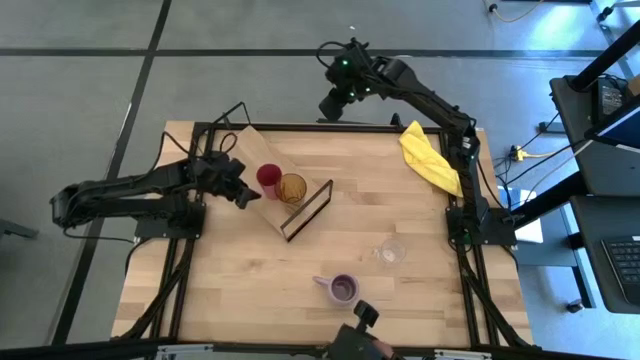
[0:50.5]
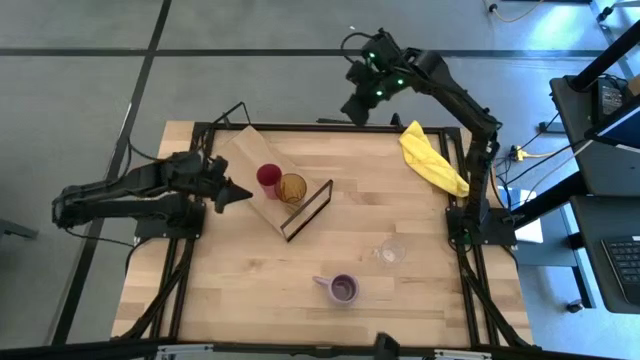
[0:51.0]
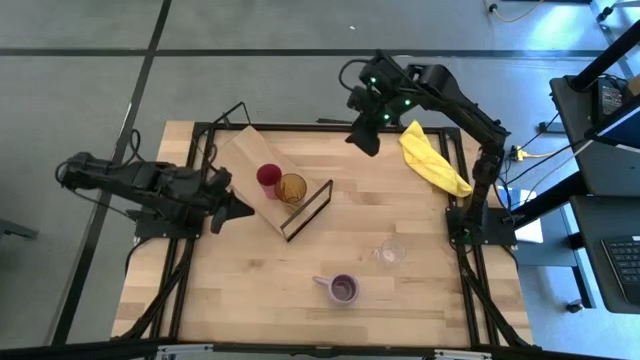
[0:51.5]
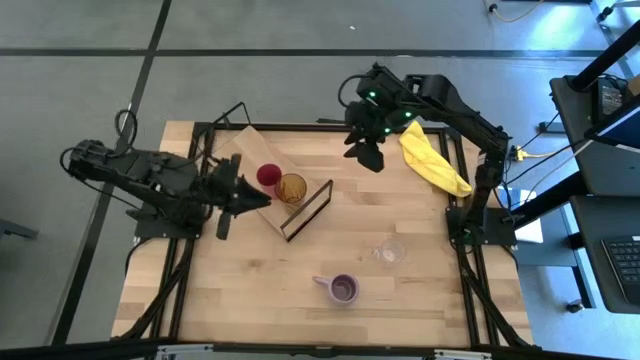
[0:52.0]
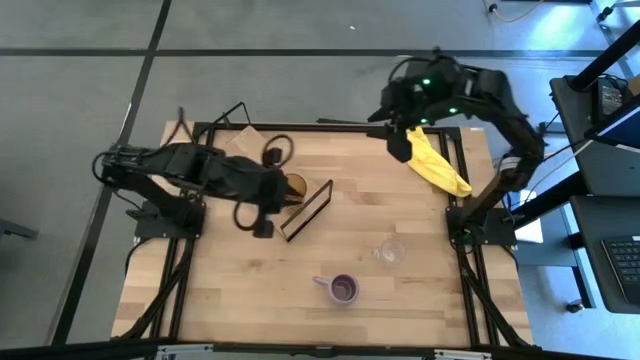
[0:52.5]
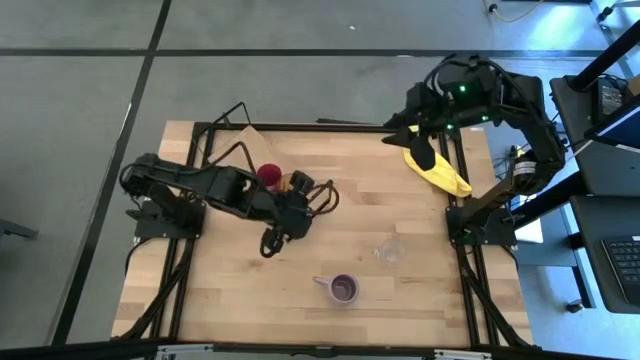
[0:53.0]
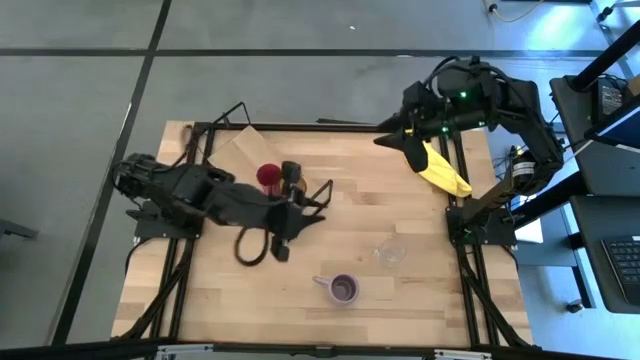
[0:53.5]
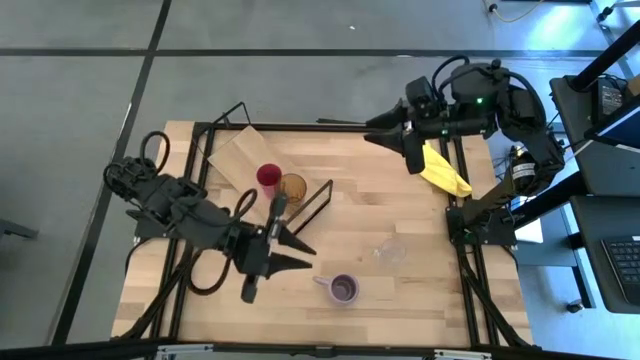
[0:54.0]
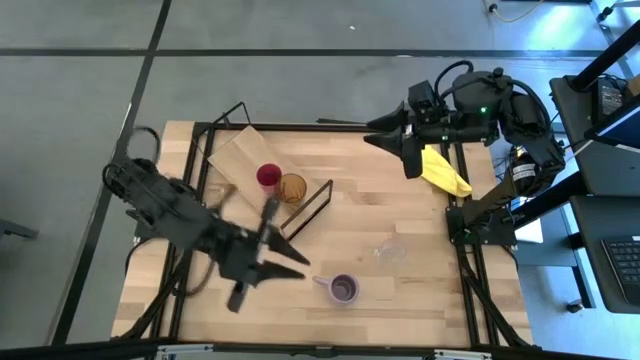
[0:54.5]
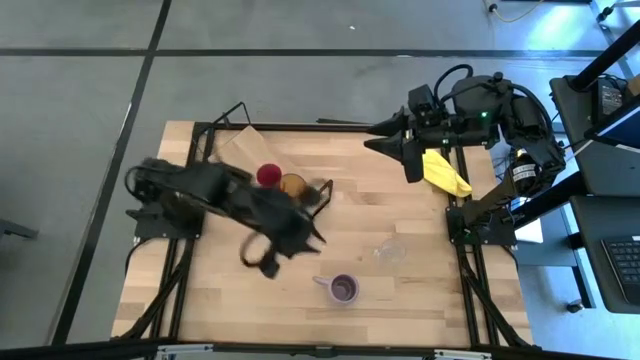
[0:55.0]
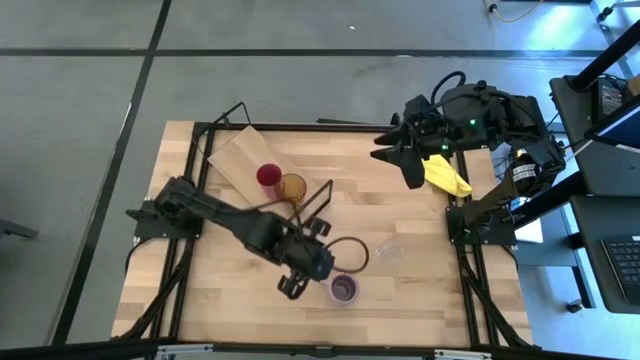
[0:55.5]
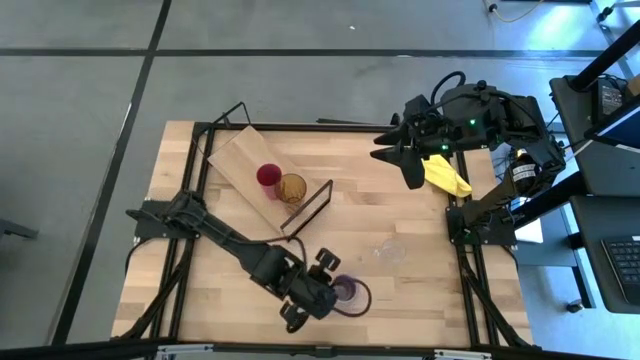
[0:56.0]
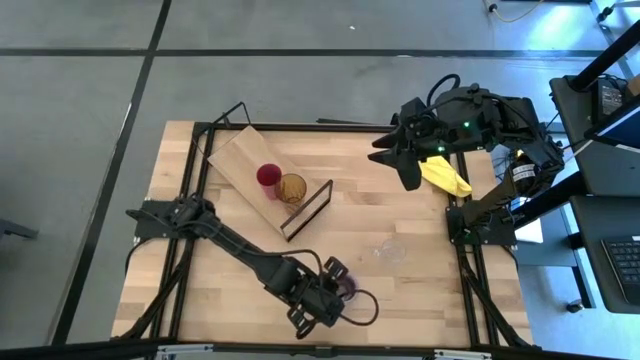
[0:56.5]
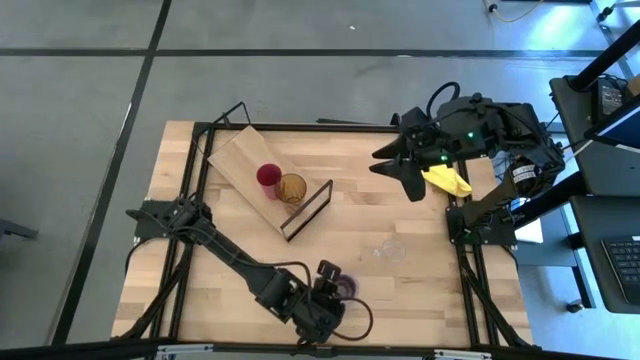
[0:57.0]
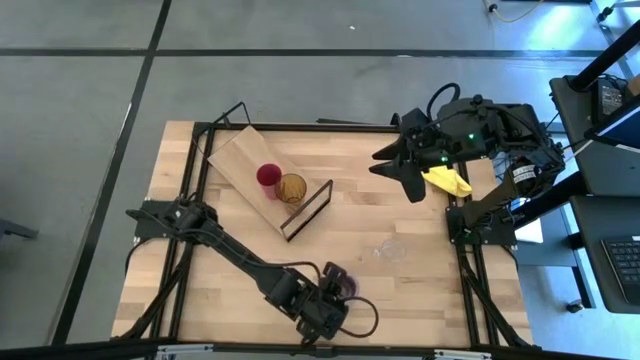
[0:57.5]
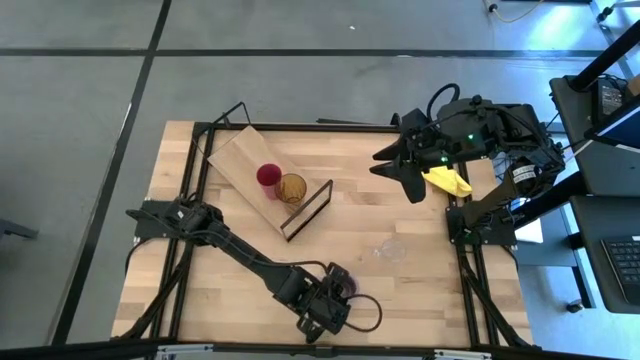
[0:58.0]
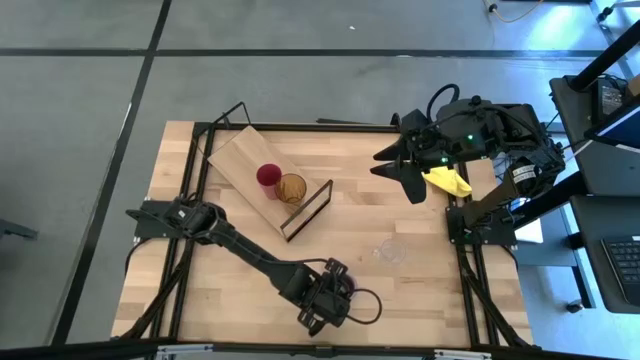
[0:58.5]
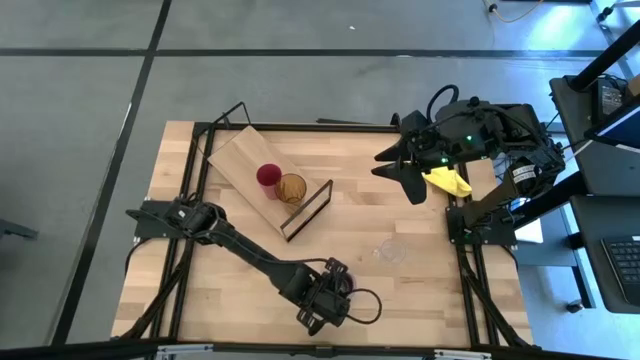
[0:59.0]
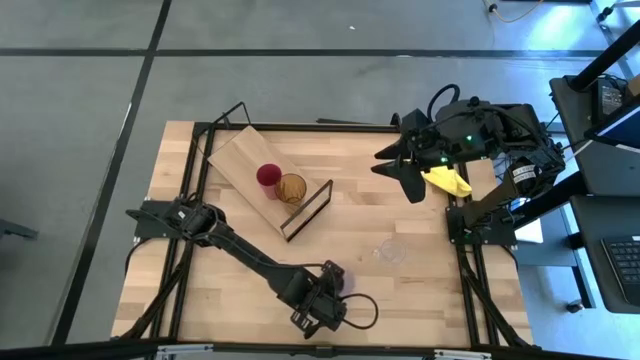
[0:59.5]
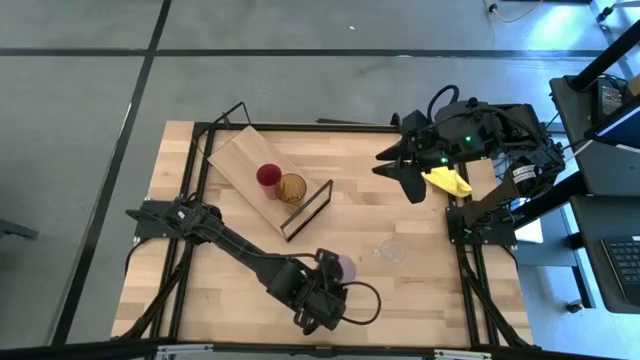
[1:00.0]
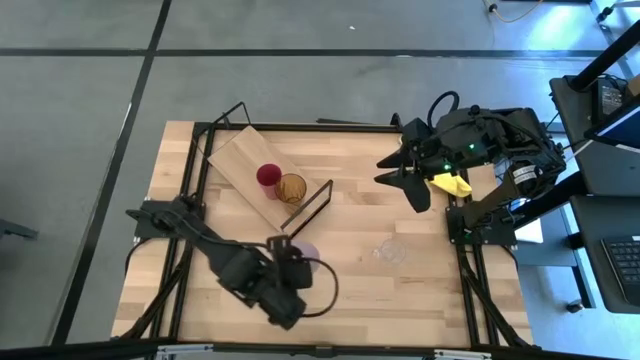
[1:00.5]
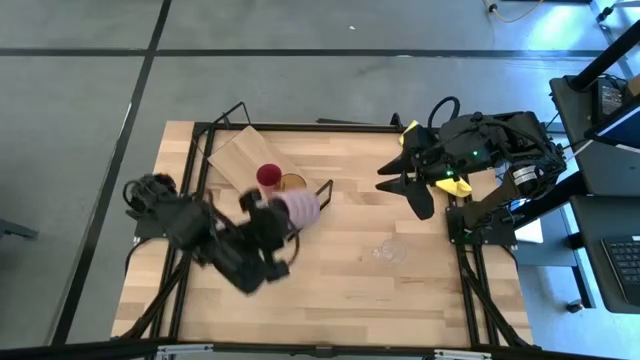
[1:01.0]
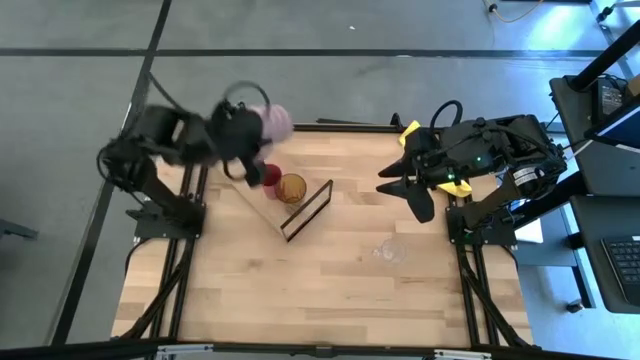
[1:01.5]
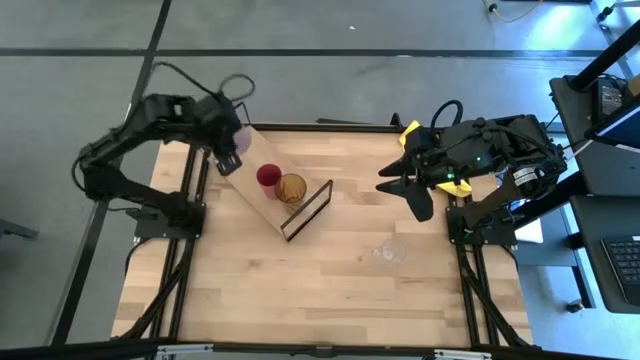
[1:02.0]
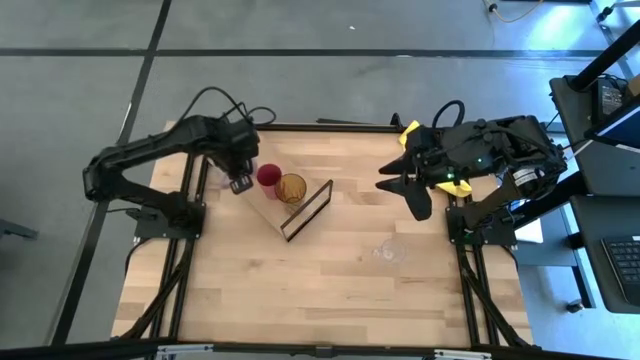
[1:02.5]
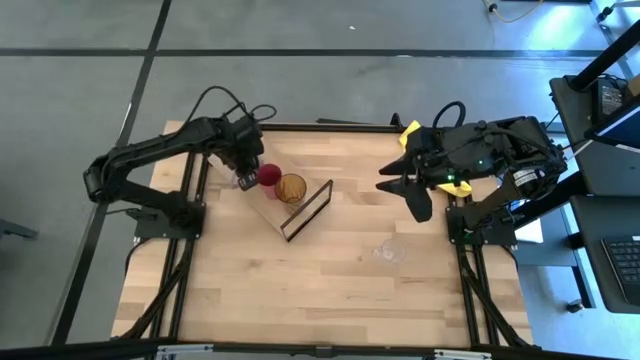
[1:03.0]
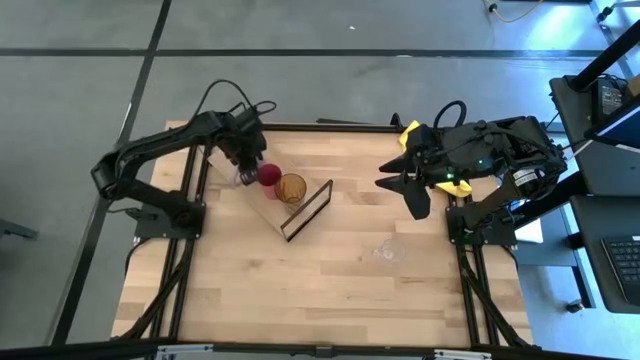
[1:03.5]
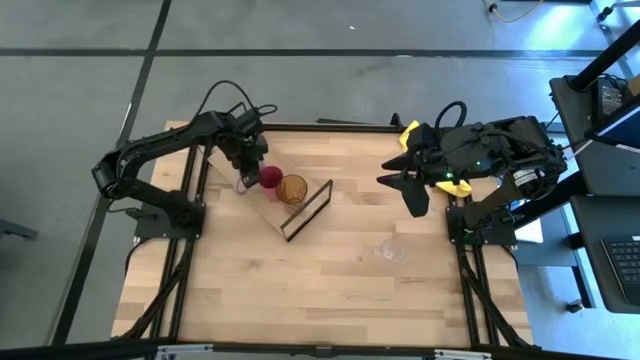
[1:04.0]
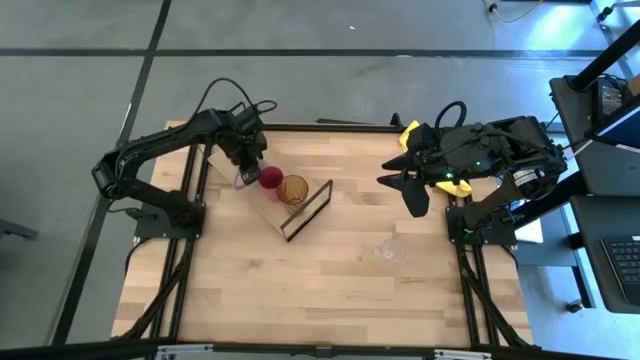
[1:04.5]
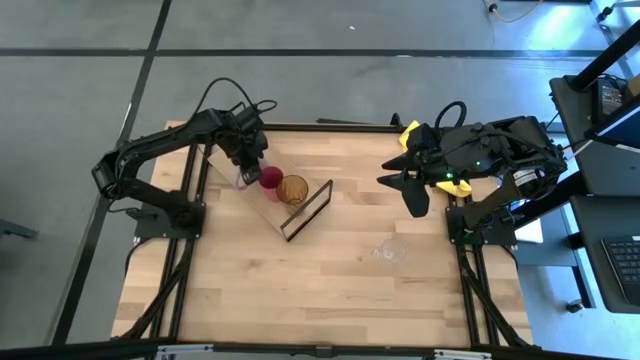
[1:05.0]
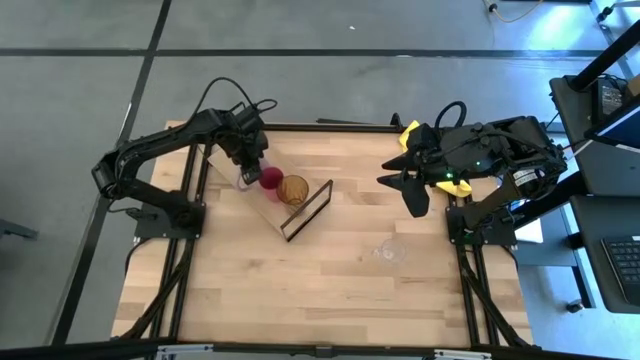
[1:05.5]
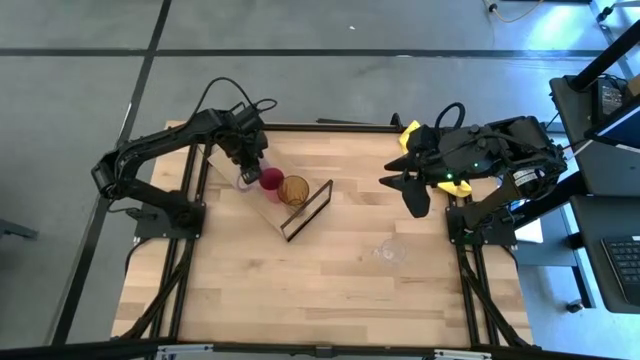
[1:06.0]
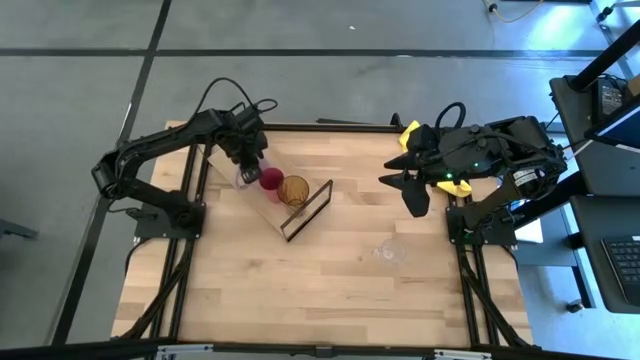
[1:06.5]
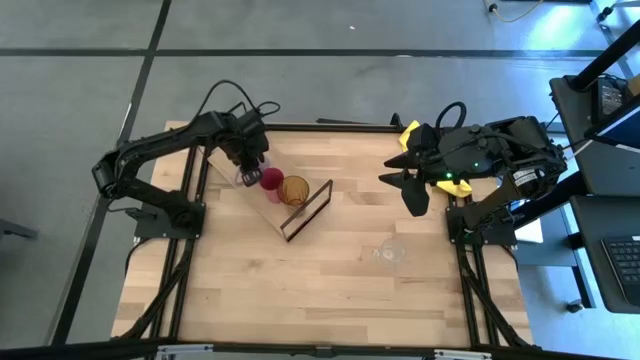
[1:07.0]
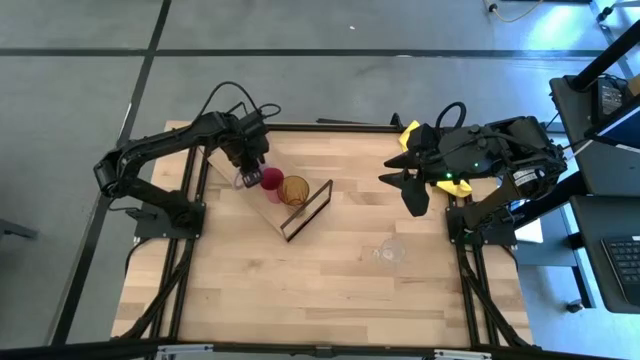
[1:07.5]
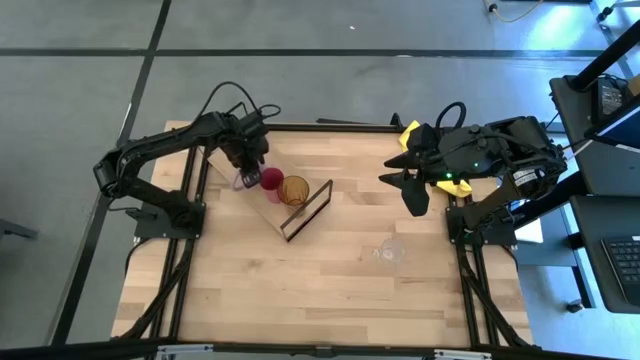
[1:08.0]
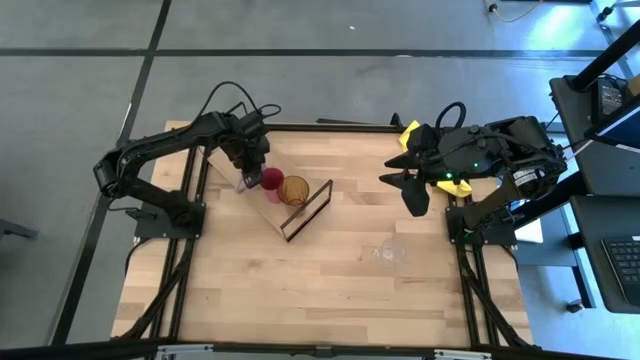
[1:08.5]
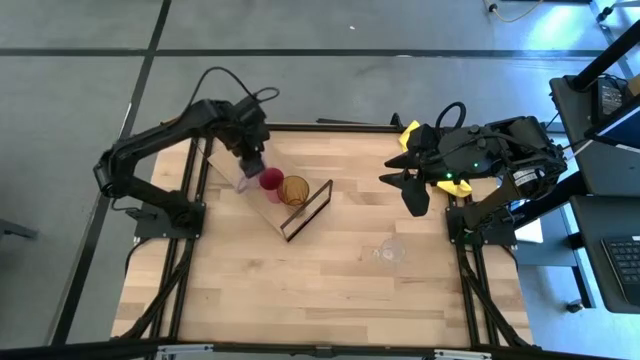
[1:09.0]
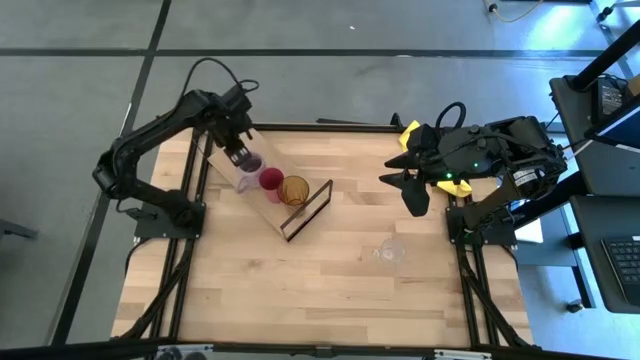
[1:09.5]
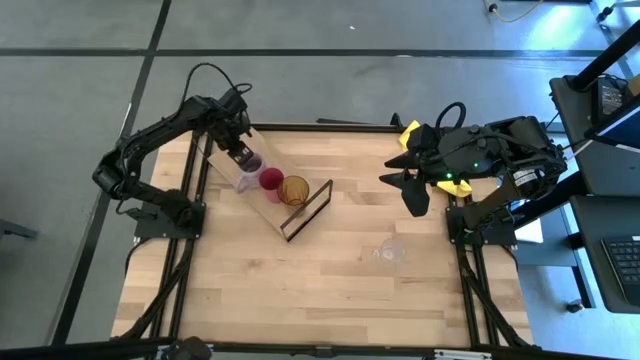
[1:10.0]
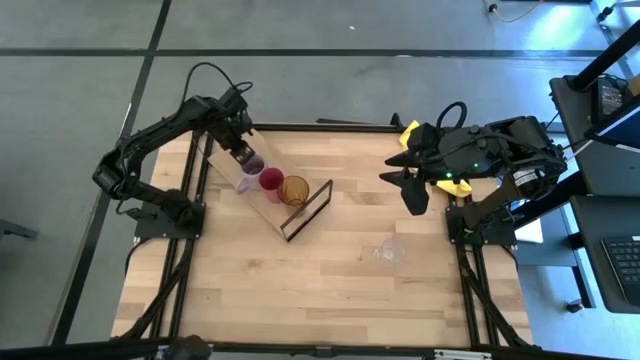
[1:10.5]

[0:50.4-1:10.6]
Task: Stack small to large cups/mugs on shelf
Put the violet cup on the shelf

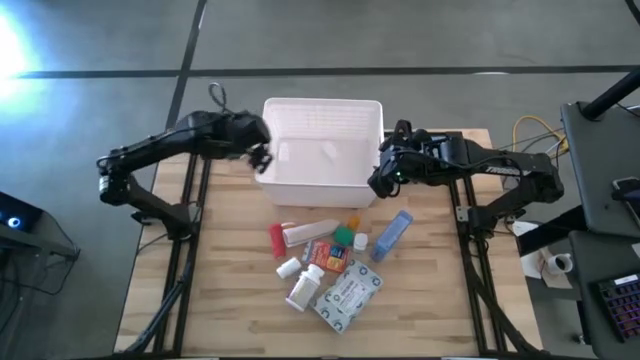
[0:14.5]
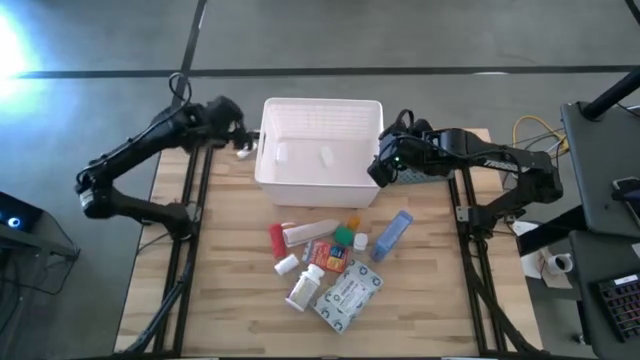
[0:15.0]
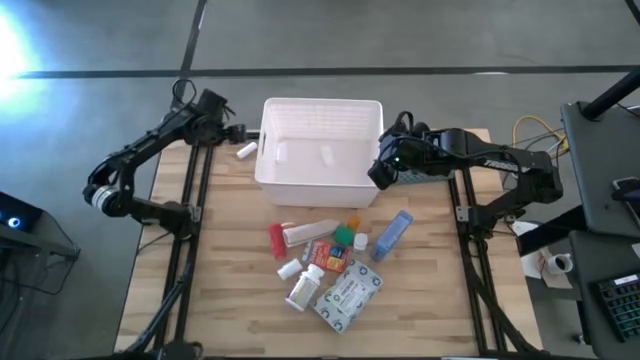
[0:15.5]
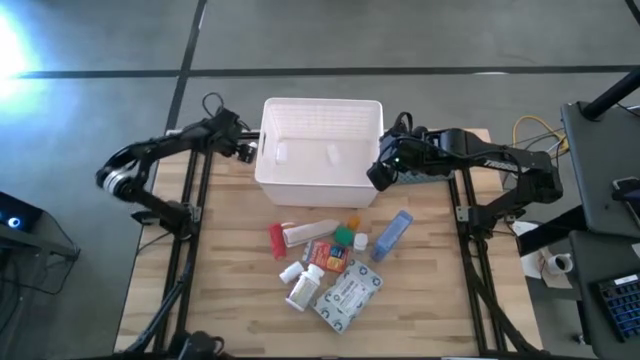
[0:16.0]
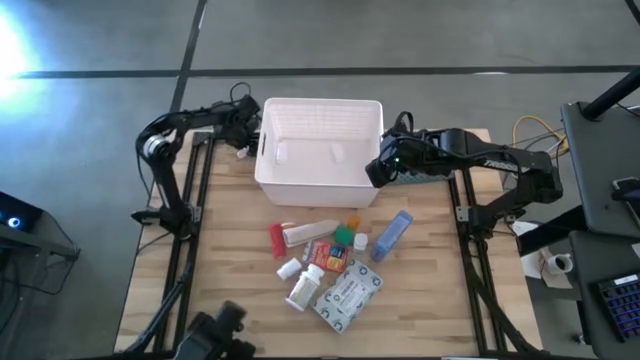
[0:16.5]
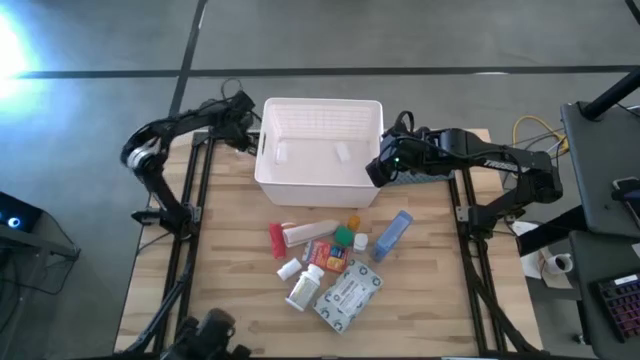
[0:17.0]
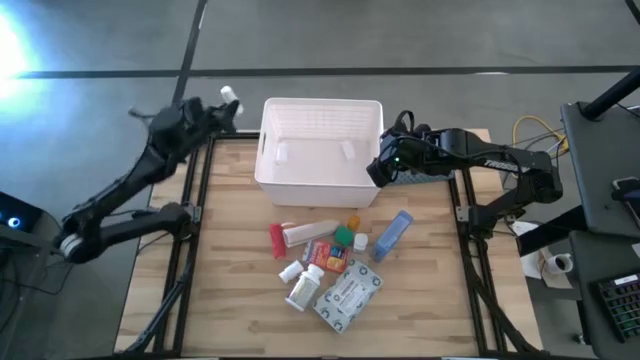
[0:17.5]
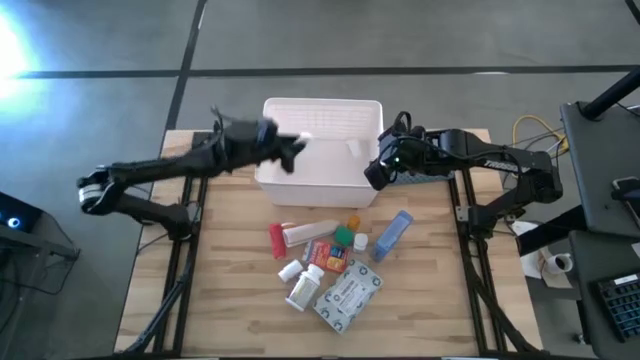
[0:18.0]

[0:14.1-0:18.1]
Task: Pick & place medical supplies in basket/bin
Put the white rolled gauze into the white bin
